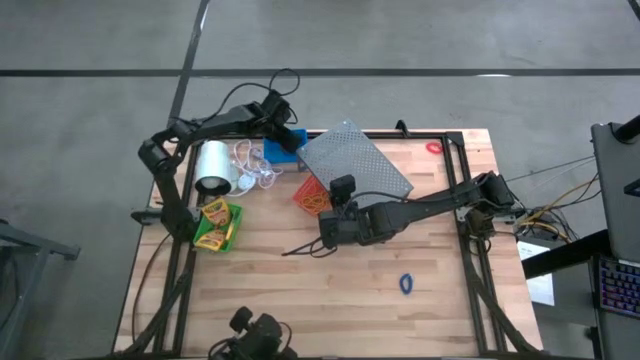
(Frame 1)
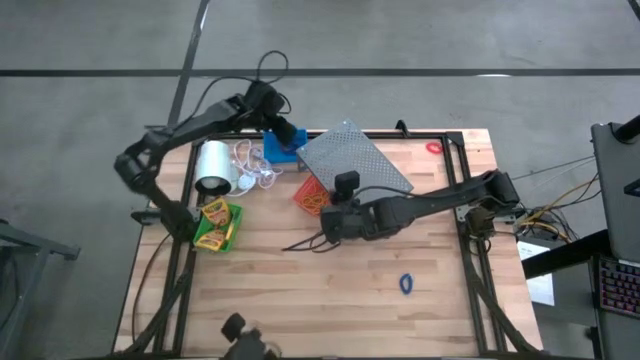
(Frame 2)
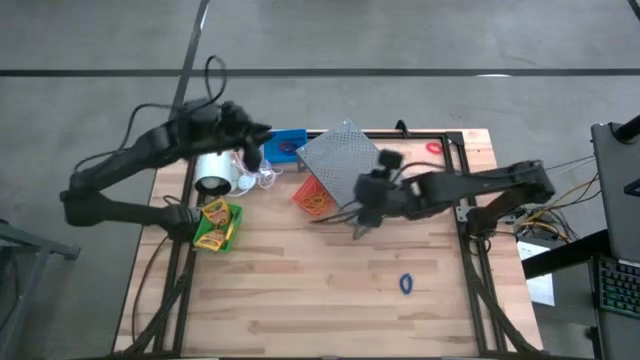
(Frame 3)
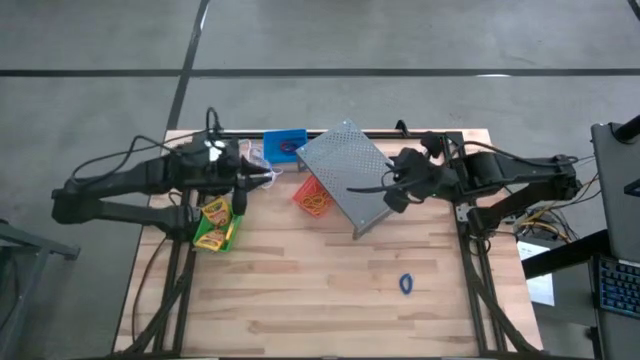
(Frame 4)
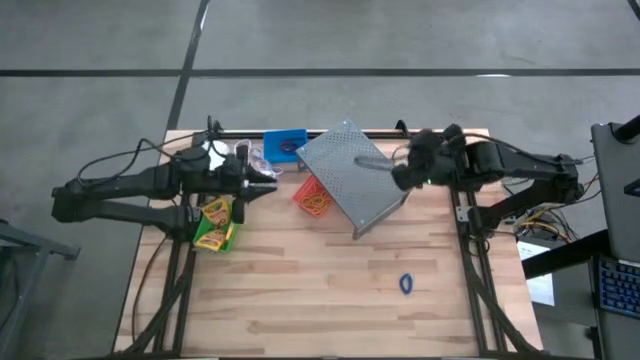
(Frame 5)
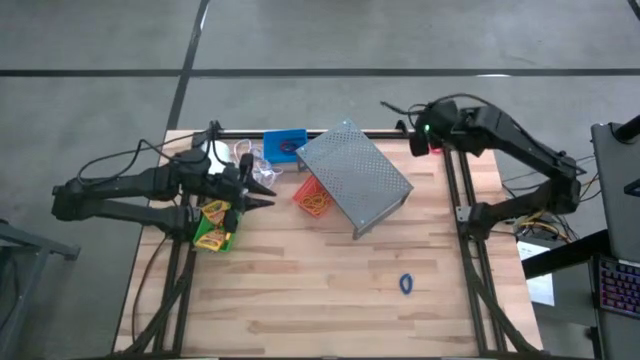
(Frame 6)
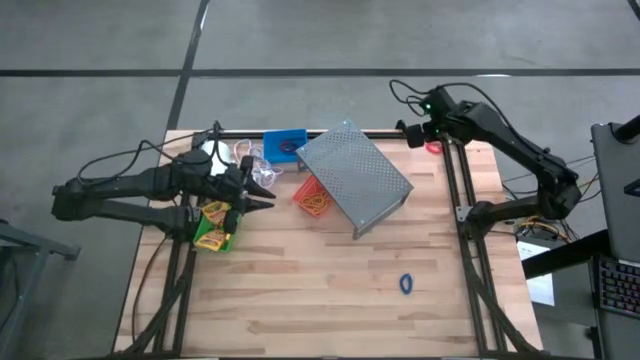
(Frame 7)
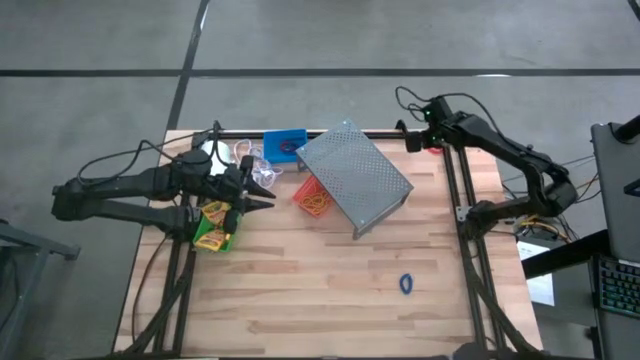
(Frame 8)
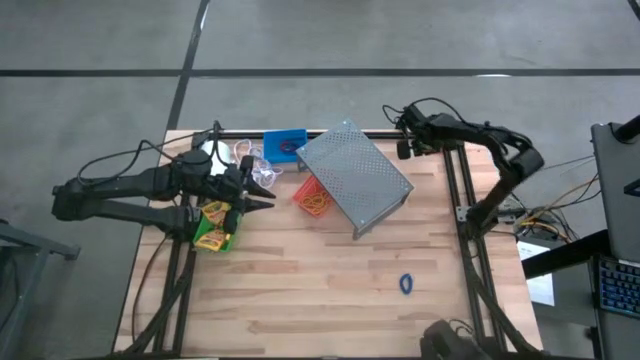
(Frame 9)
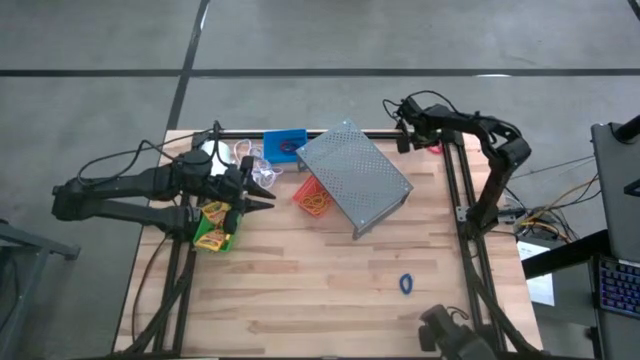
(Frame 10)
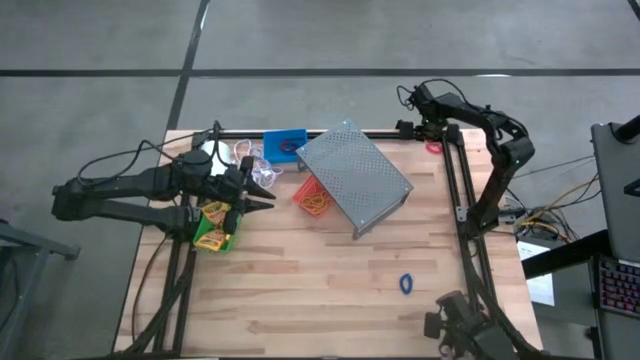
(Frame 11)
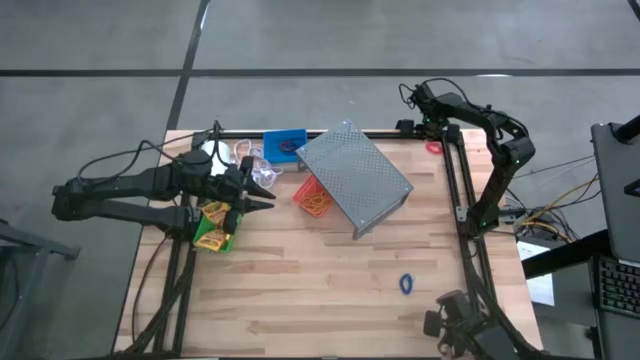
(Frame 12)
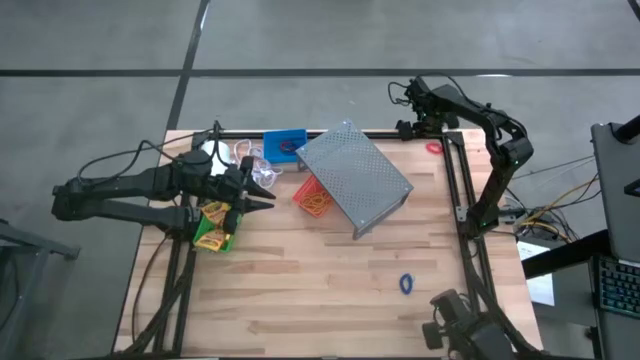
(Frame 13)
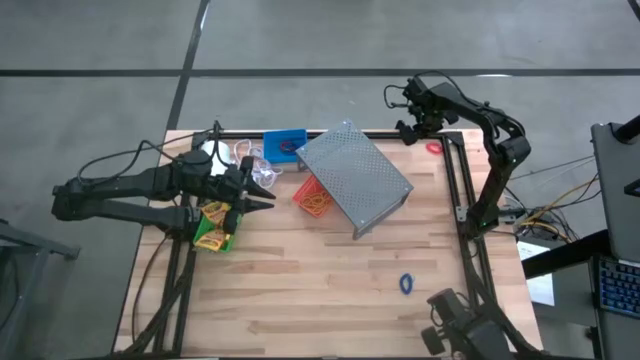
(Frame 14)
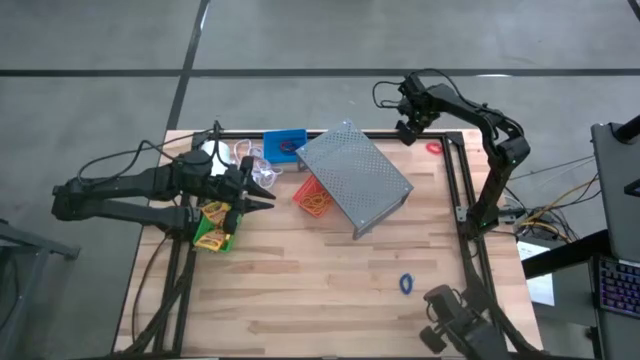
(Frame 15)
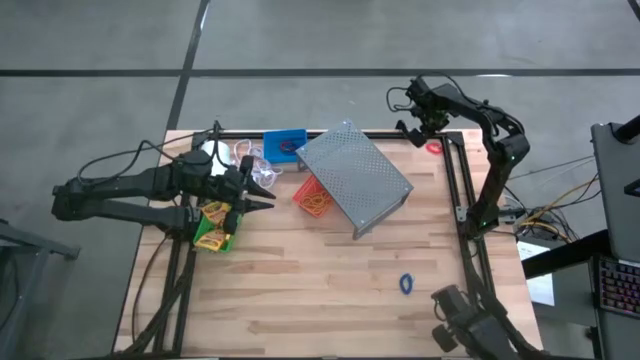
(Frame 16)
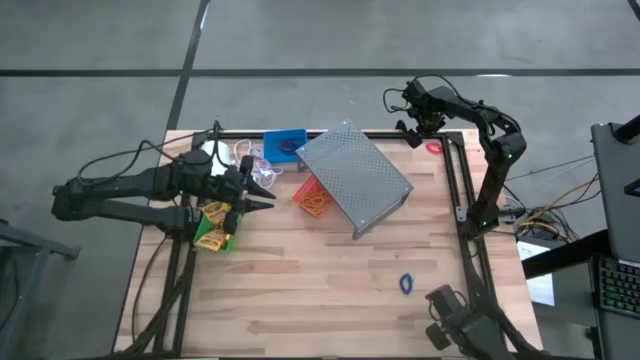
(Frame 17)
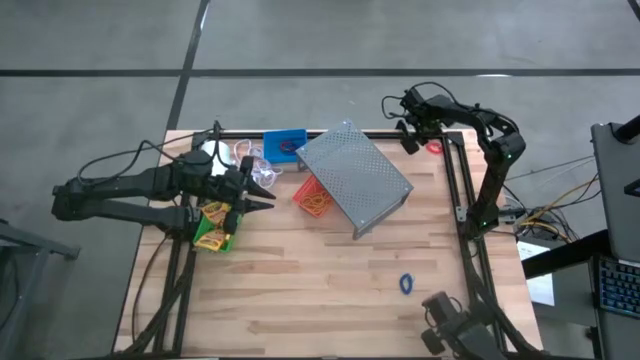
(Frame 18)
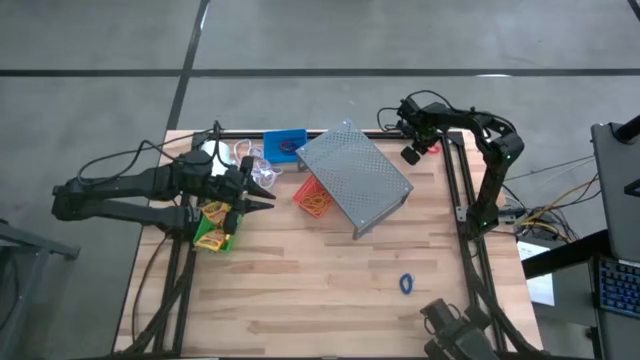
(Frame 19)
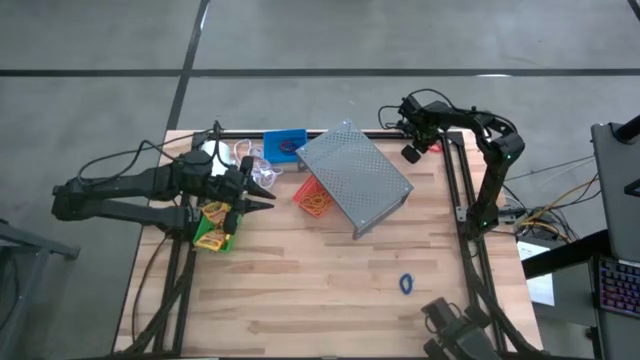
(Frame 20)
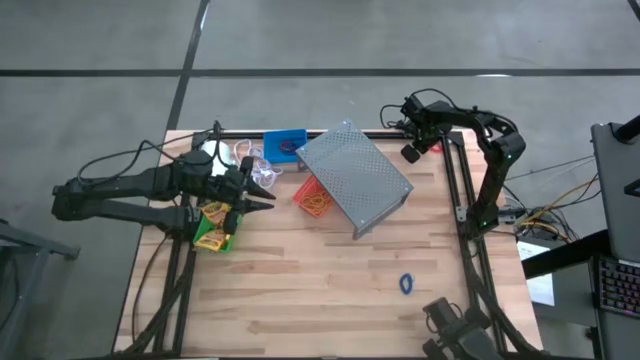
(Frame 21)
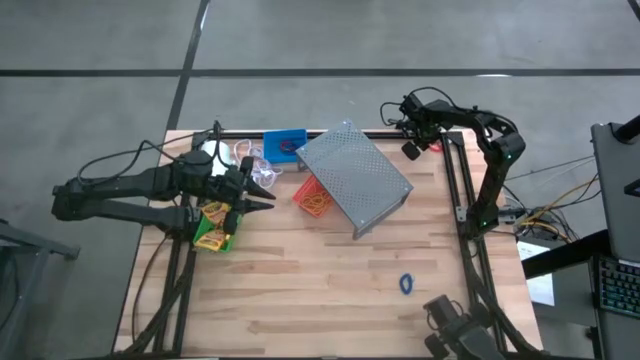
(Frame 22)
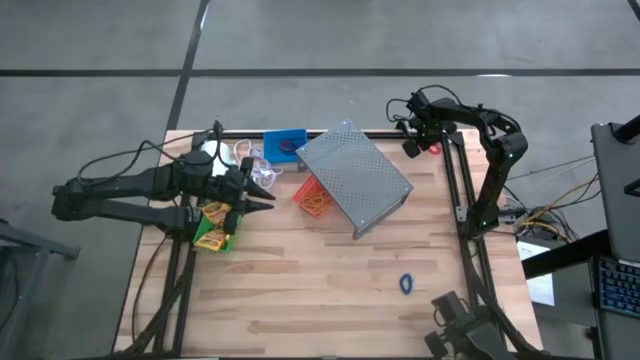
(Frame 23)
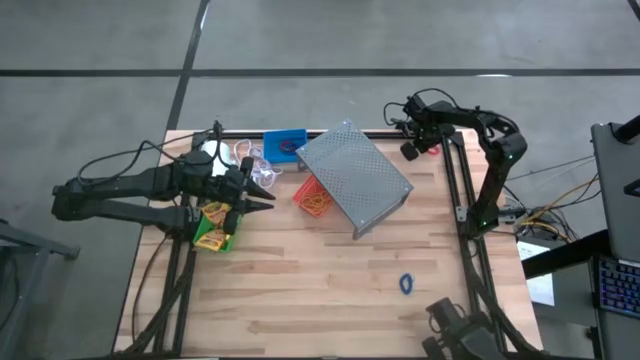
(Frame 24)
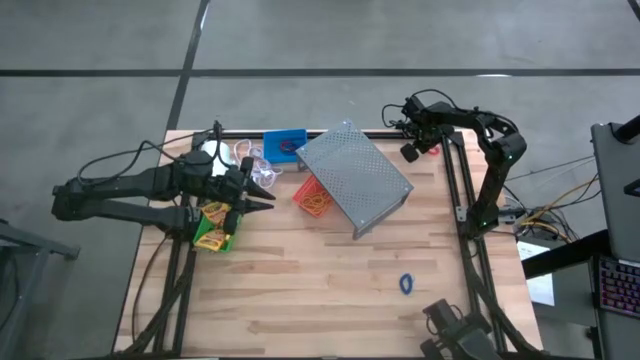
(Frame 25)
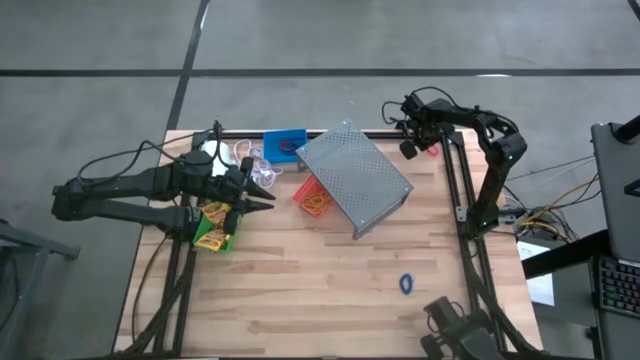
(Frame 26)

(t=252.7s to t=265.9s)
Task: Pick & Place Office Desk Supplies
Put the orange spring rubber band into the blue bin

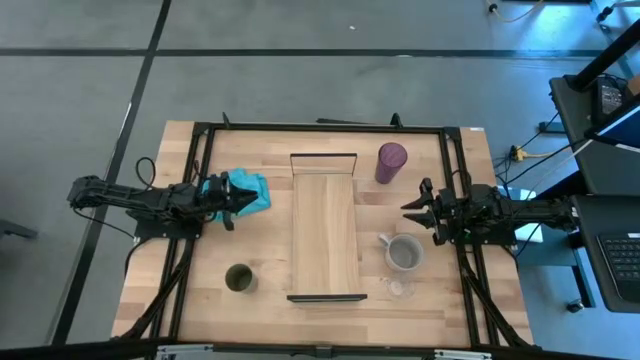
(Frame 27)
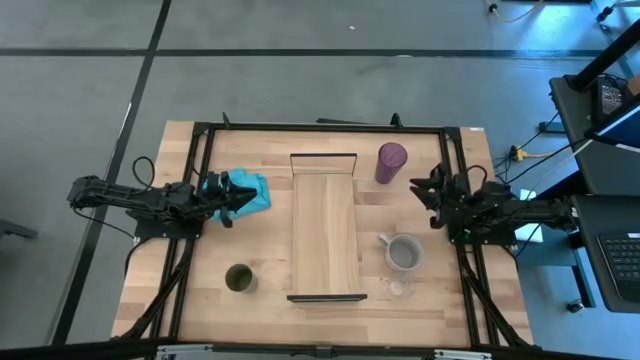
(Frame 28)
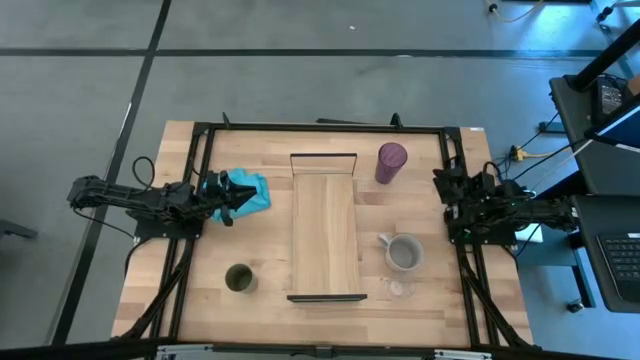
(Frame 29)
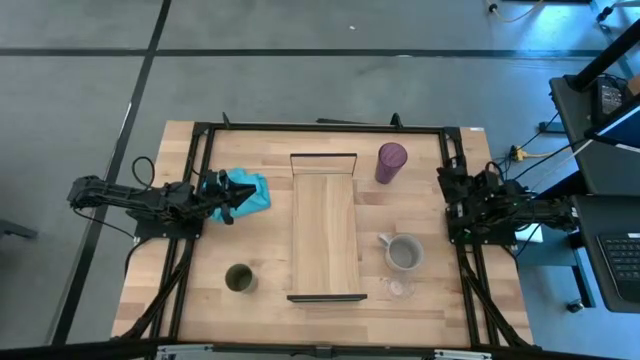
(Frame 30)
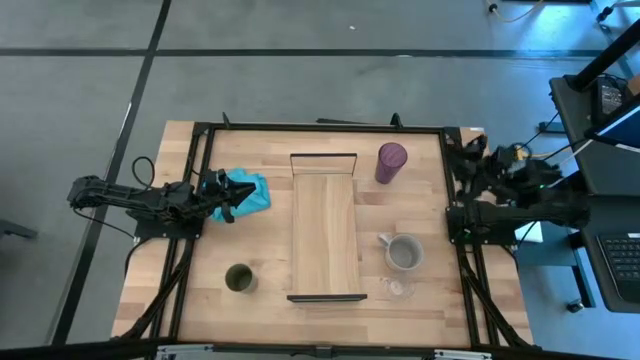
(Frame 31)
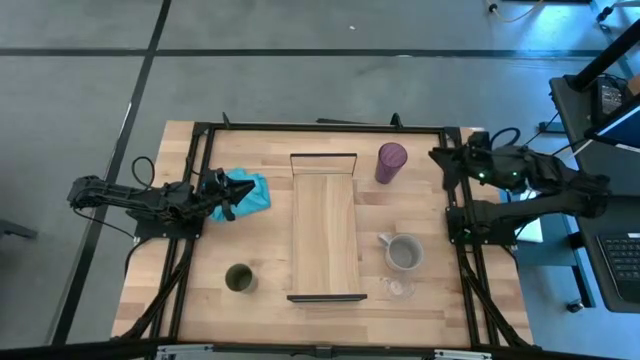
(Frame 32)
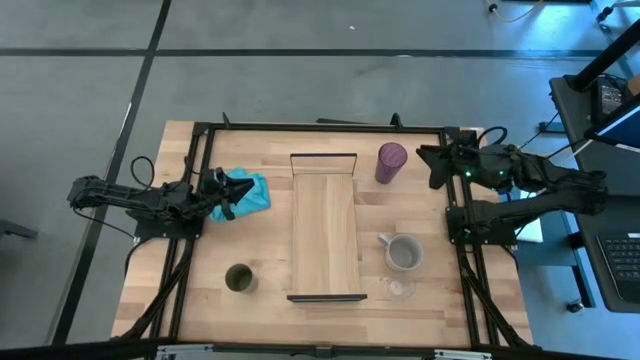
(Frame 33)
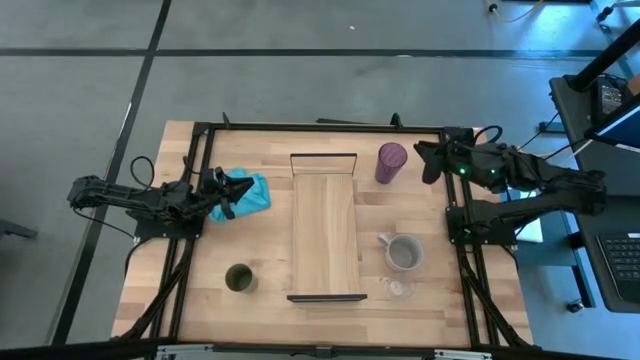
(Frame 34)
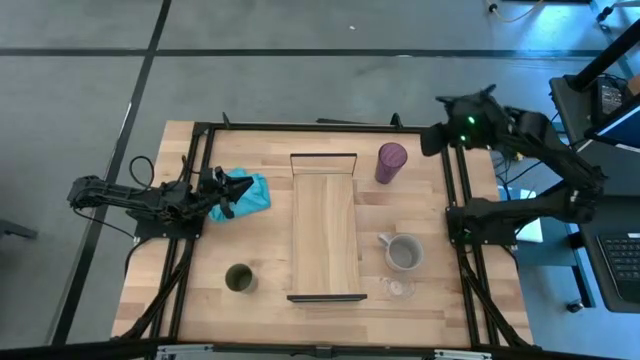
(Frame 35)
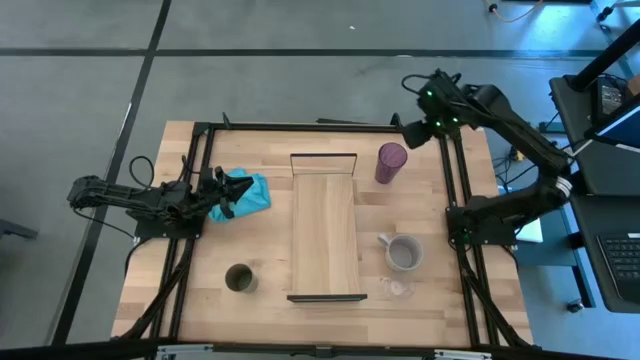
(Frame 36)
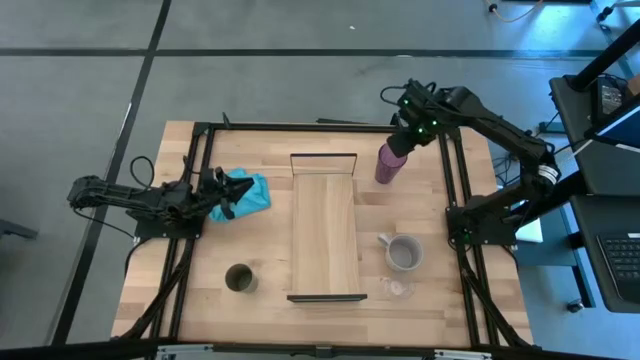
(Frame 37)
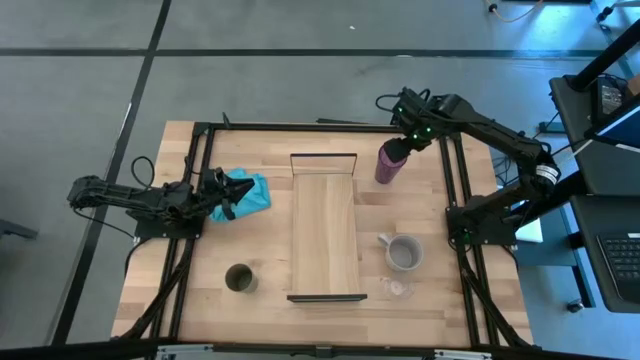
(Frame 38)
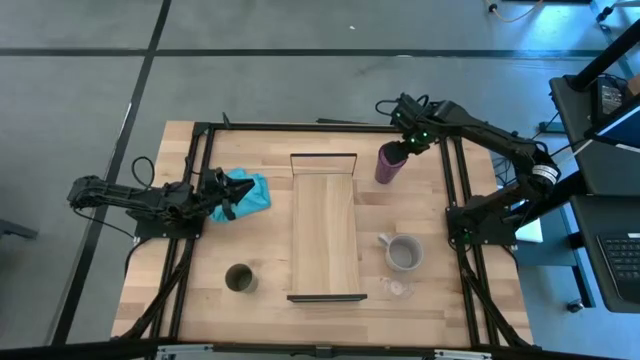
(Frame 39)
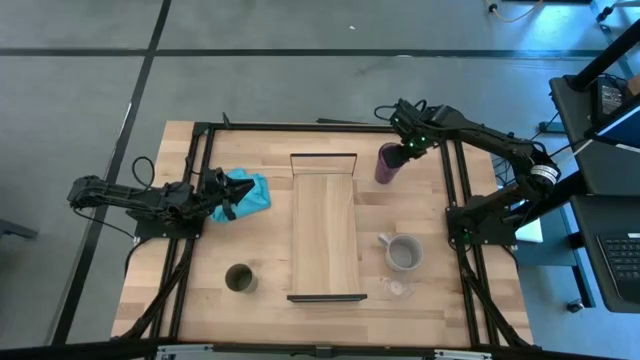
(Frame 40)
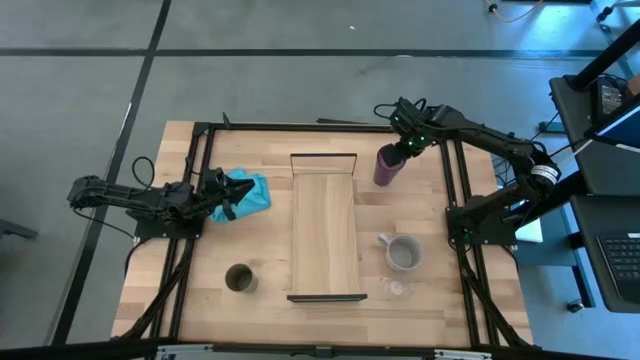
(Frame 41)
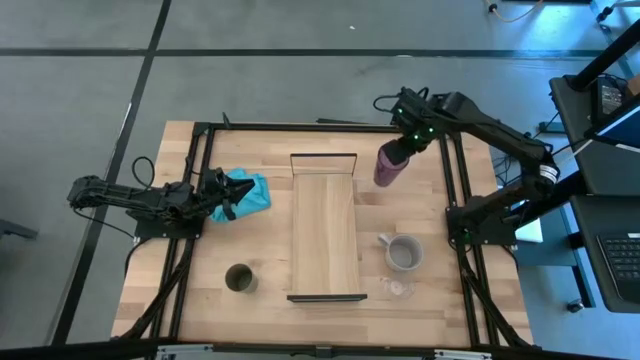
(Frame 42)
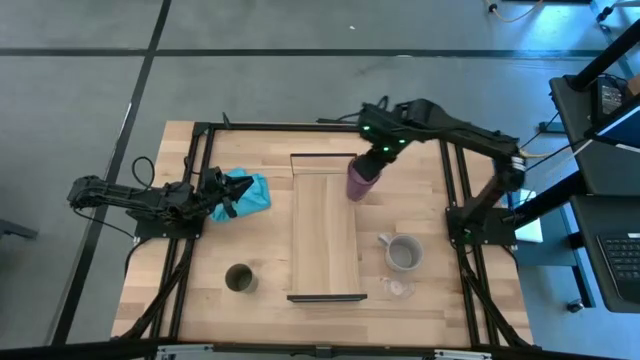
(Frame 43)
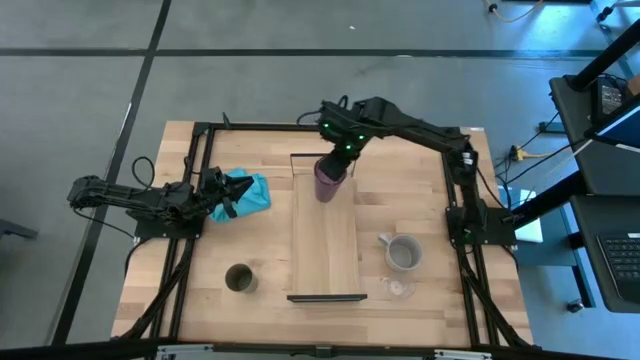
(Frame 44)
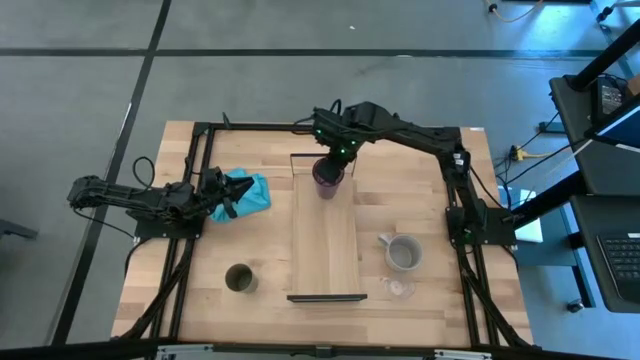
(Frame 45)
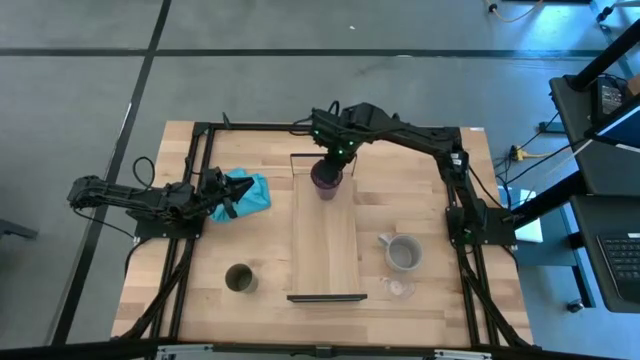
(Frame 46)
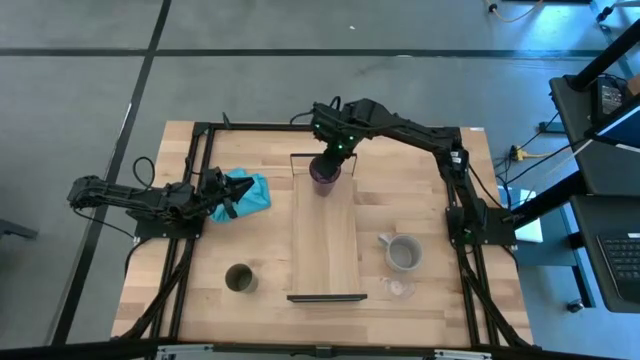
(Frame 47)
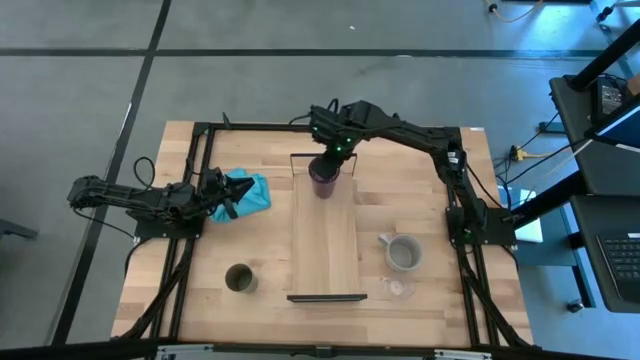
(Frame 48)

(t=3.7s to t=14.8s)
Task: Stack small to large cups/mugs on shelf
Put the purple cup on the shelf
